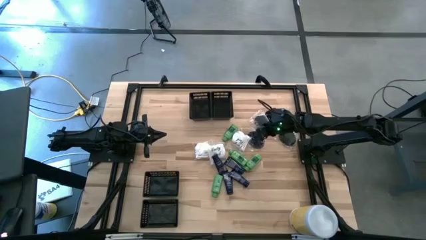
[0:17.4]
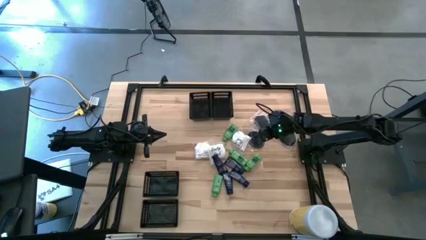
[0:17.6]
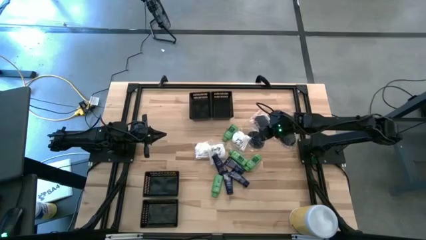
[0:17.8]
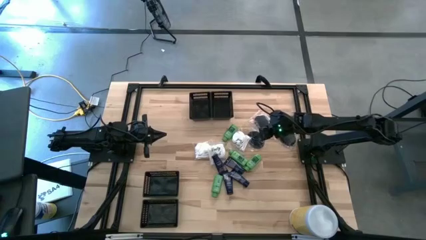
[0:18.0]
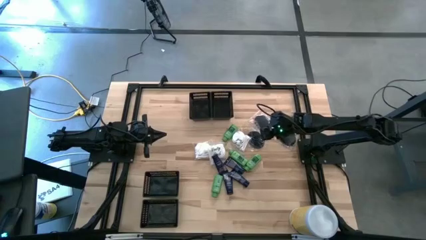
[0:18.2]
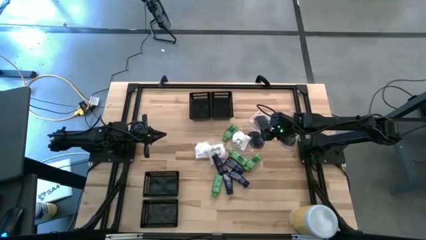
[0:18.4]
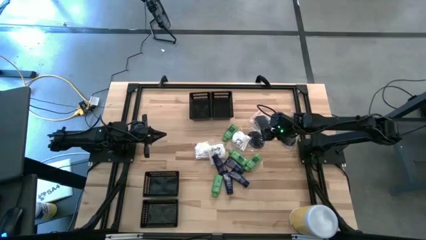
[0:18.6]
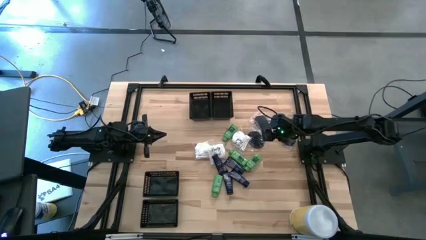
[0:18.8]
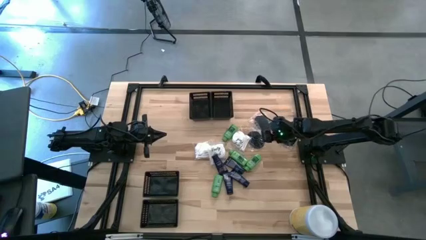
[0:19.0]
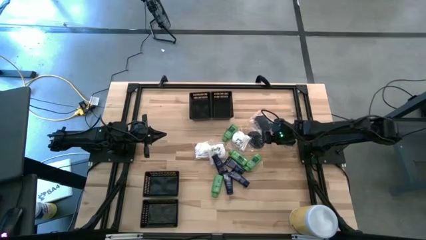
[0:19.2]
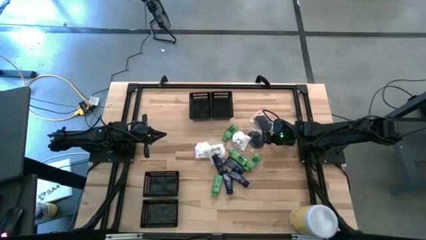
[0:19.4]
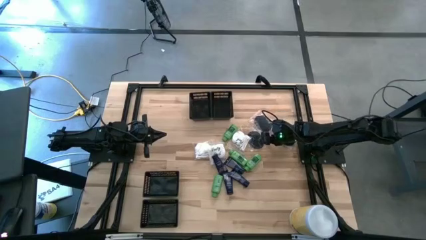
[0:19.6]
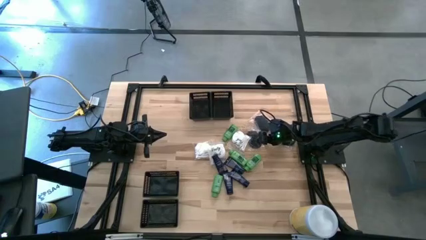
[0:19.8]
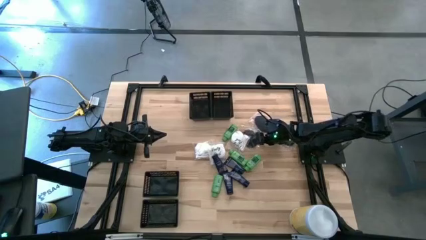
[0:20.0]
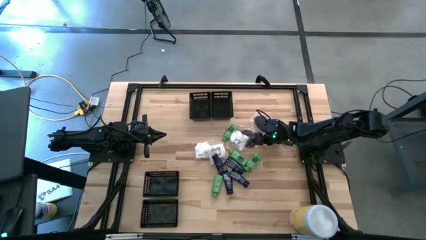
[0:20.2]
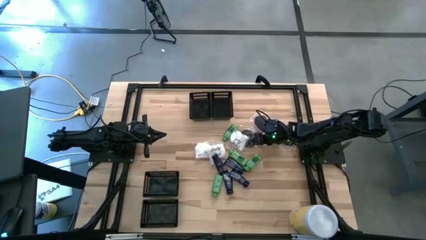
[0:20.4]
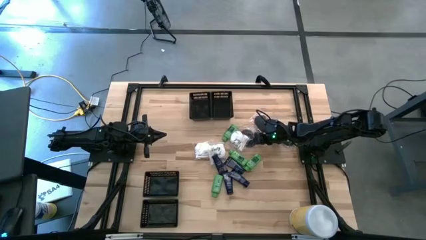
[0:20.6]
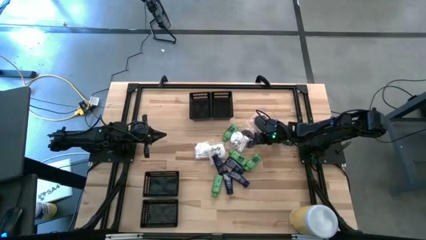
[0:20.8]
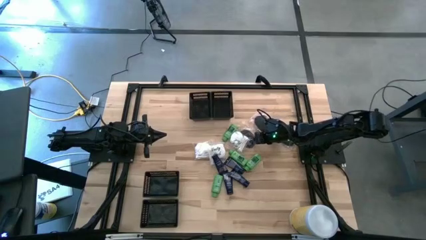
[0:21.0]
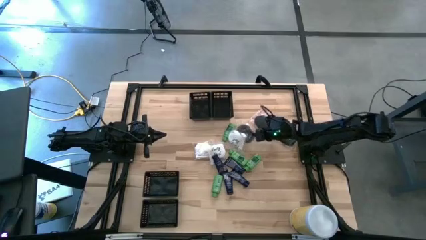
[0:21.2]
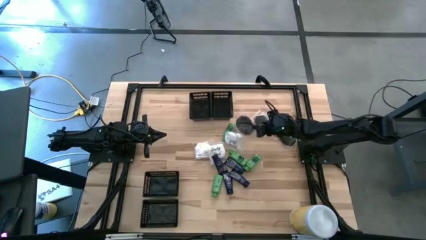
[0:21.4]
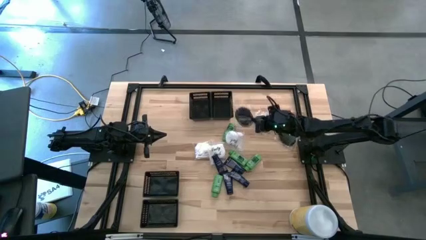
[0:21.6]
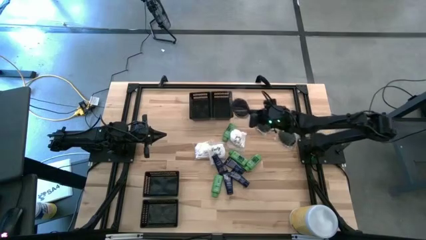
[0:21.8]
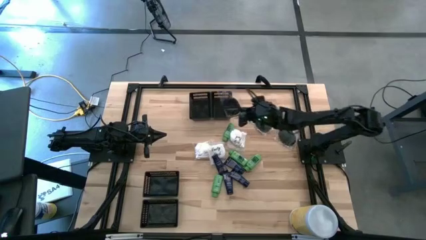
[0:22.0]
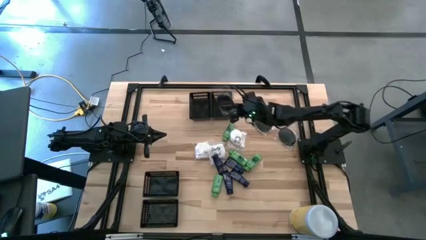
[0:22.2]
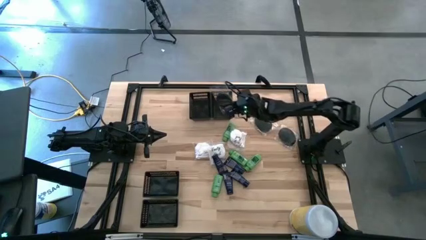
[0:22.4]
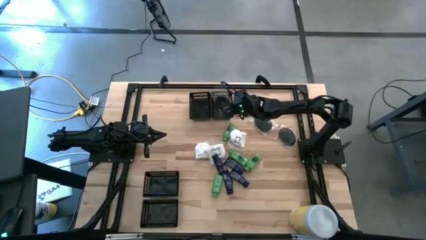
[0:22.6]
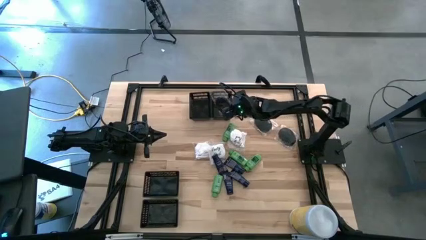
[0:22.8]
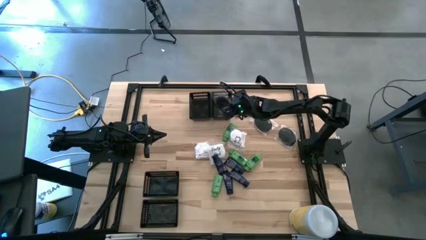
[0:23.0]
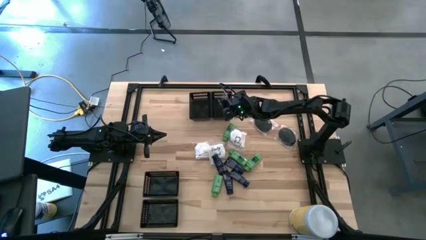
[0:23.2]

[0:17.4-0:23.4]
Task: Pick & Place Travel size toiletries
Put the black hairbrush into the top right basket

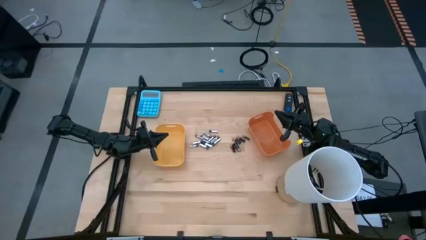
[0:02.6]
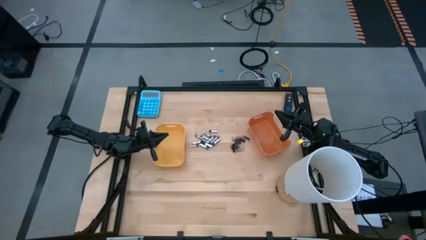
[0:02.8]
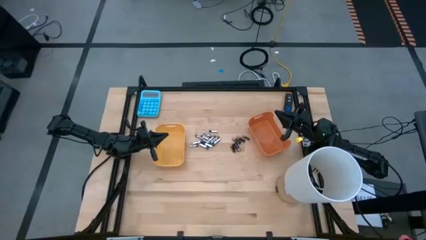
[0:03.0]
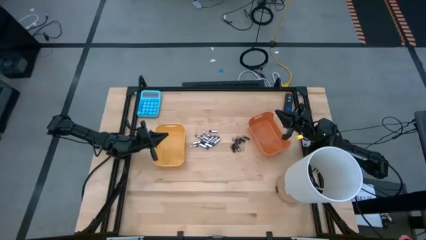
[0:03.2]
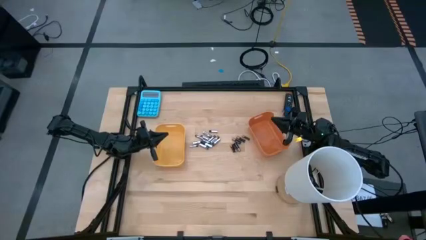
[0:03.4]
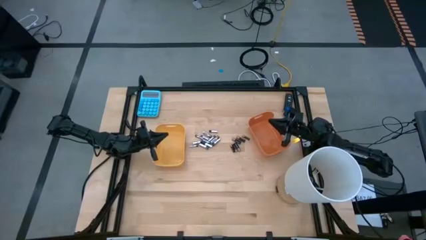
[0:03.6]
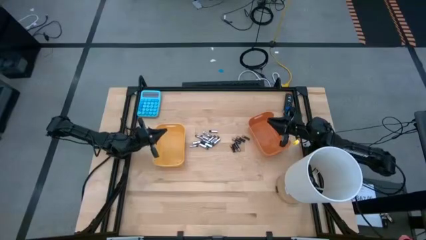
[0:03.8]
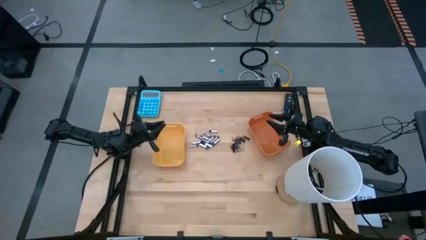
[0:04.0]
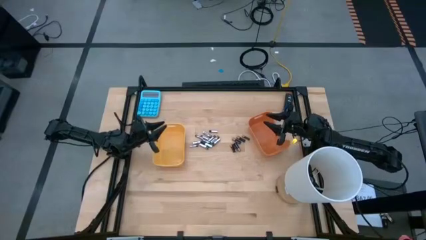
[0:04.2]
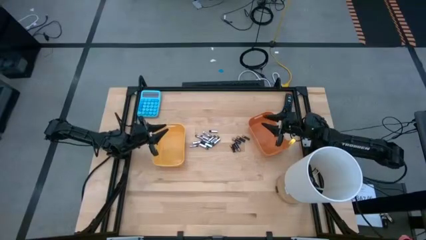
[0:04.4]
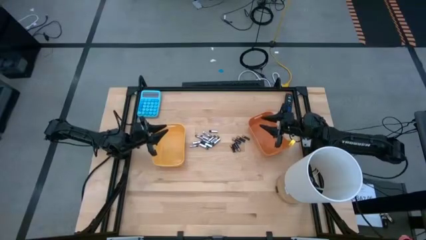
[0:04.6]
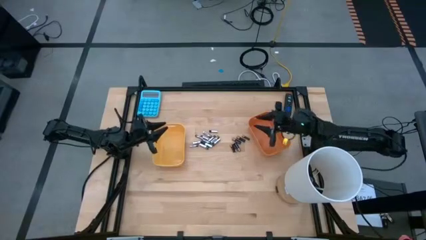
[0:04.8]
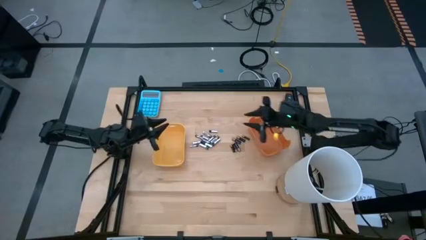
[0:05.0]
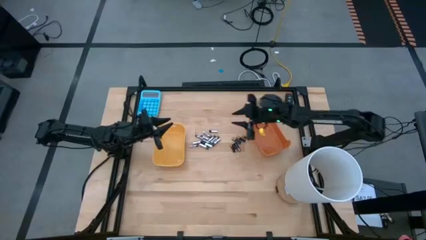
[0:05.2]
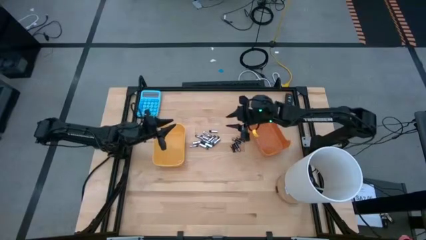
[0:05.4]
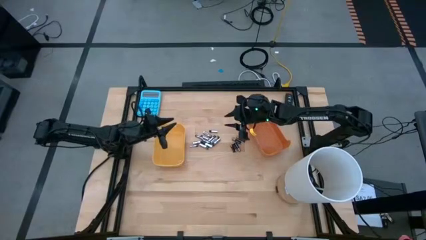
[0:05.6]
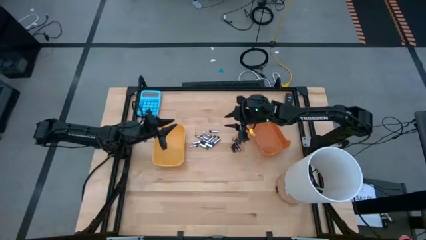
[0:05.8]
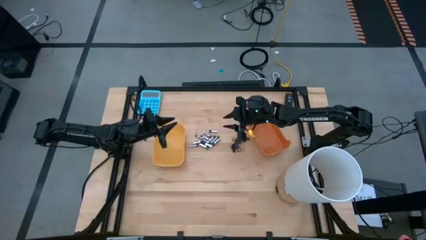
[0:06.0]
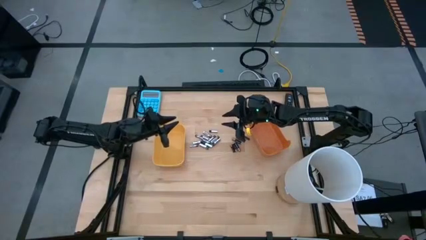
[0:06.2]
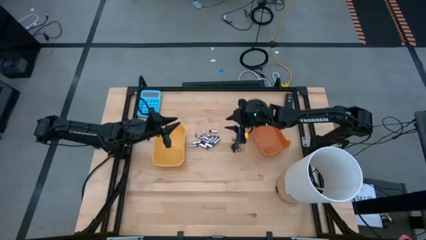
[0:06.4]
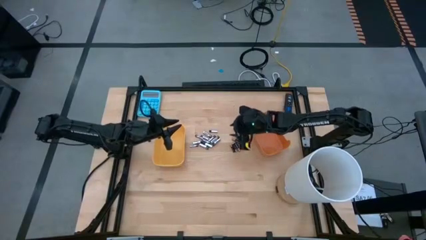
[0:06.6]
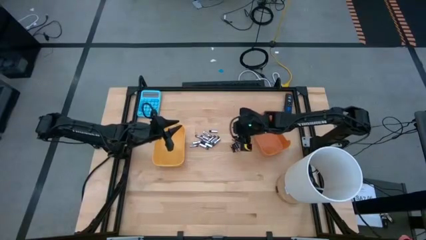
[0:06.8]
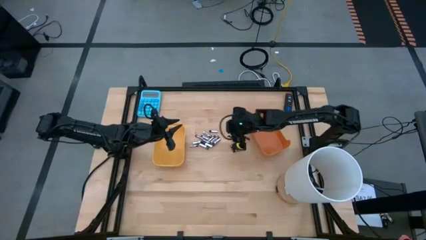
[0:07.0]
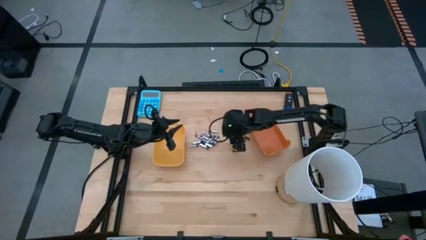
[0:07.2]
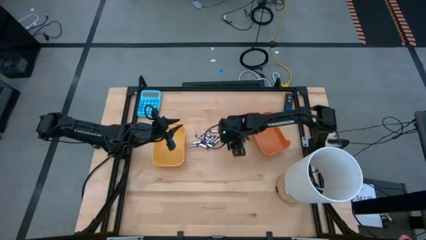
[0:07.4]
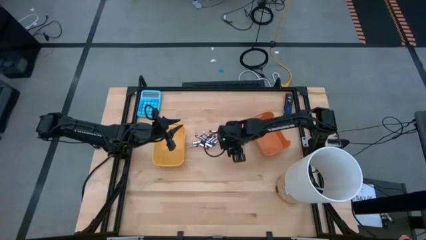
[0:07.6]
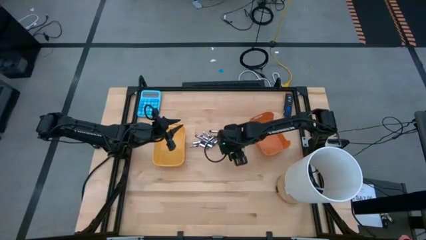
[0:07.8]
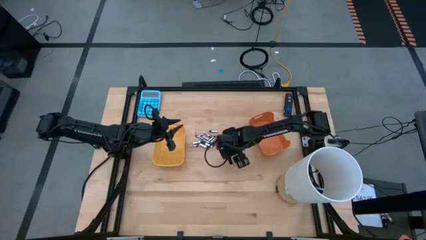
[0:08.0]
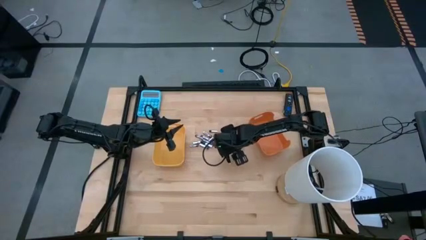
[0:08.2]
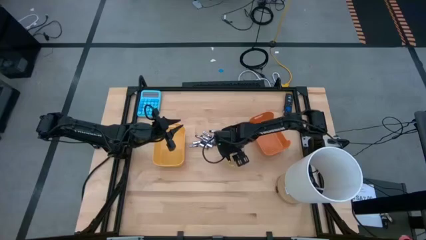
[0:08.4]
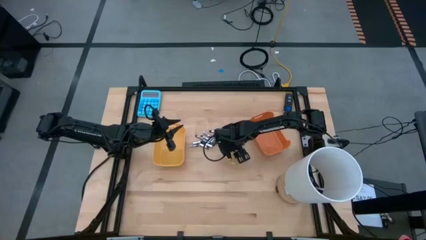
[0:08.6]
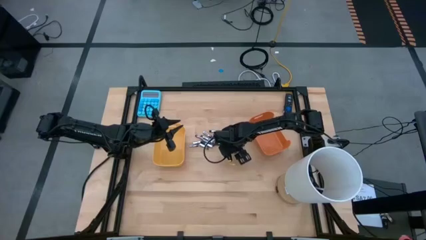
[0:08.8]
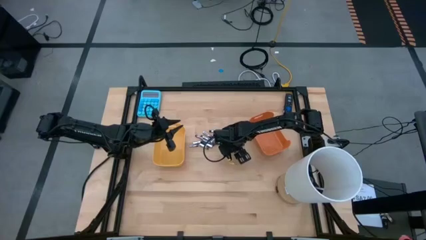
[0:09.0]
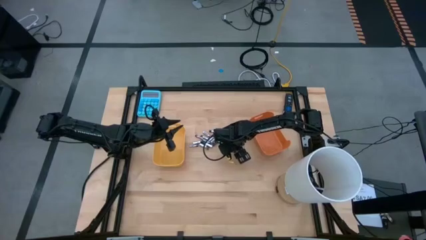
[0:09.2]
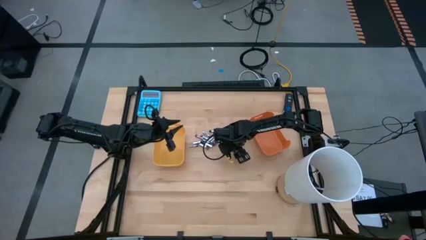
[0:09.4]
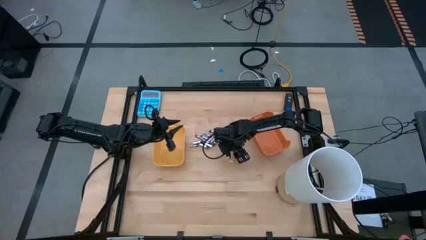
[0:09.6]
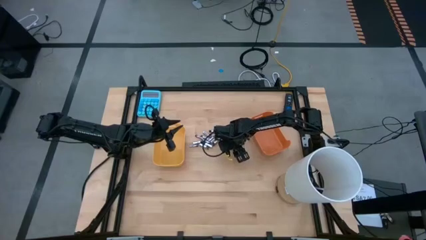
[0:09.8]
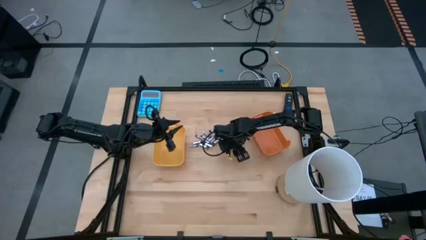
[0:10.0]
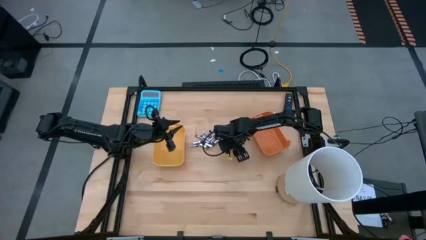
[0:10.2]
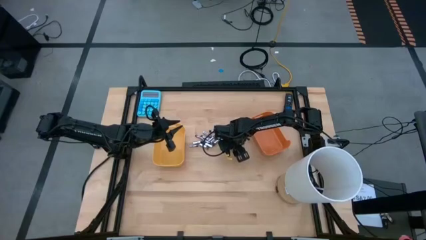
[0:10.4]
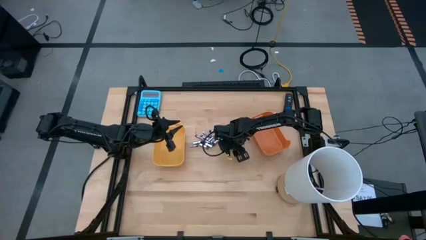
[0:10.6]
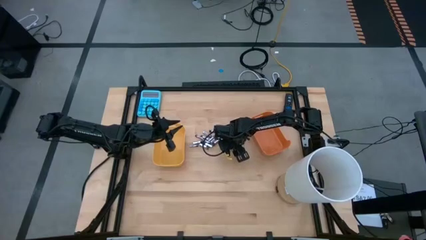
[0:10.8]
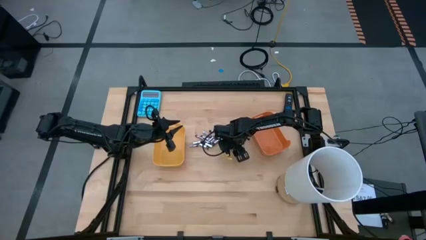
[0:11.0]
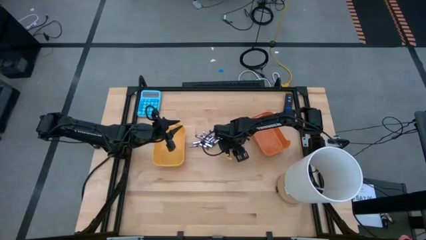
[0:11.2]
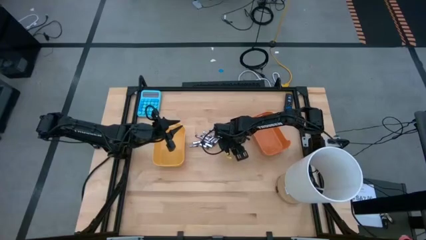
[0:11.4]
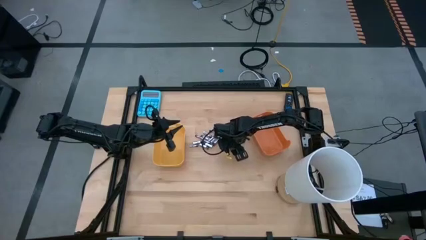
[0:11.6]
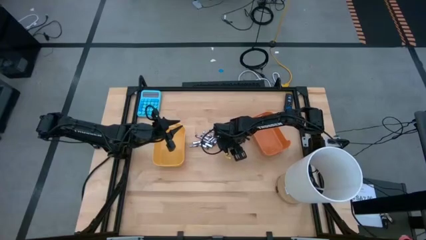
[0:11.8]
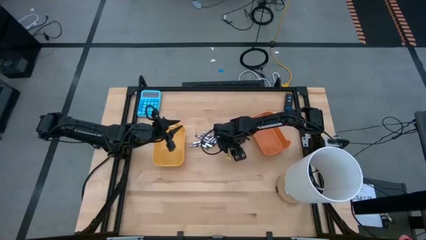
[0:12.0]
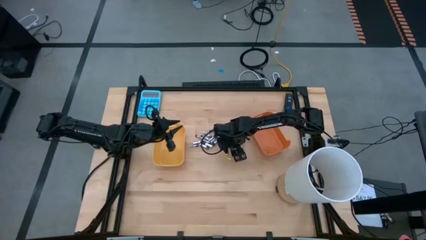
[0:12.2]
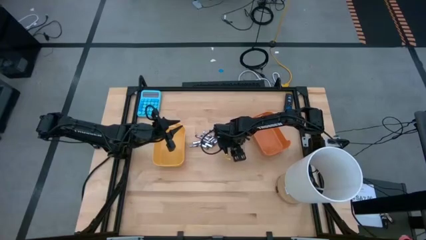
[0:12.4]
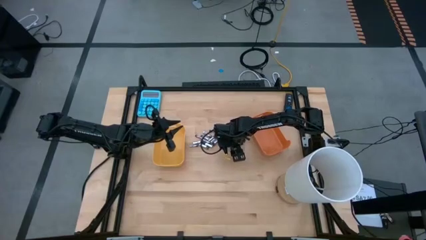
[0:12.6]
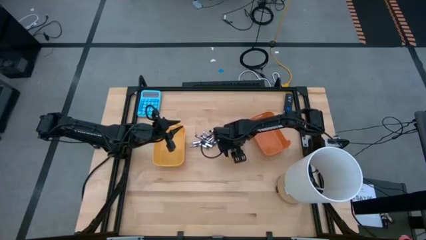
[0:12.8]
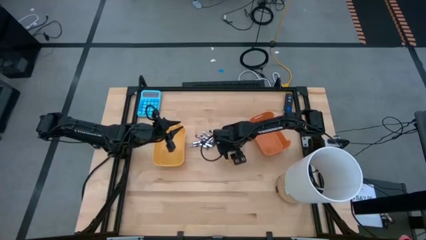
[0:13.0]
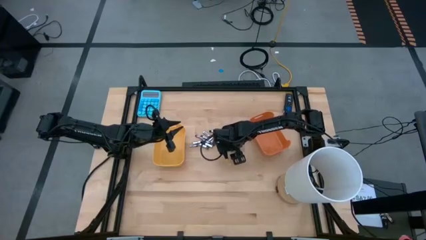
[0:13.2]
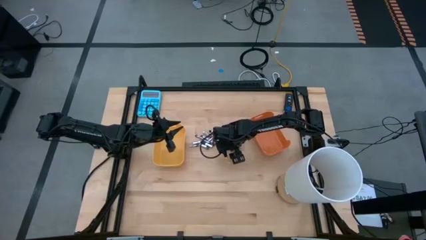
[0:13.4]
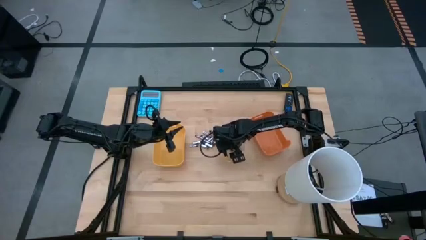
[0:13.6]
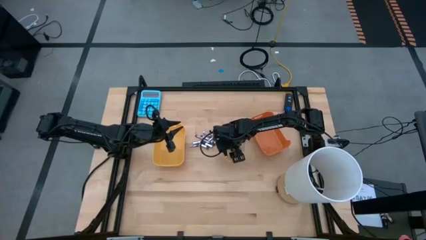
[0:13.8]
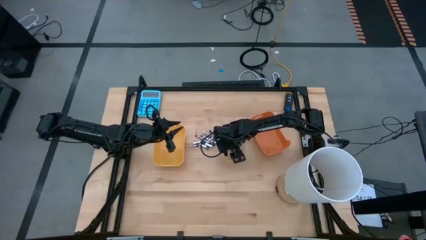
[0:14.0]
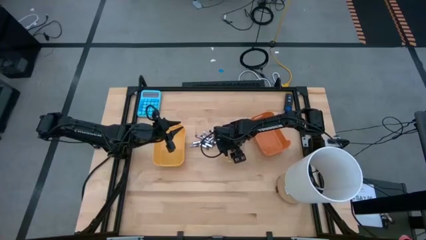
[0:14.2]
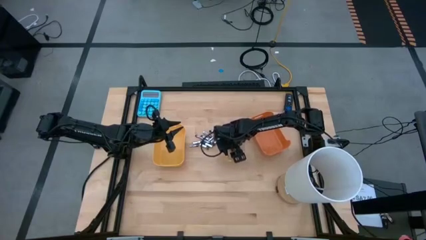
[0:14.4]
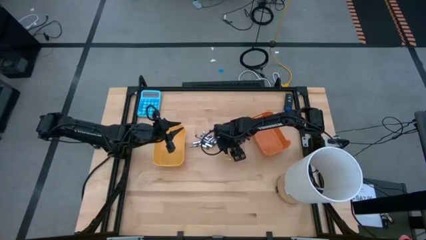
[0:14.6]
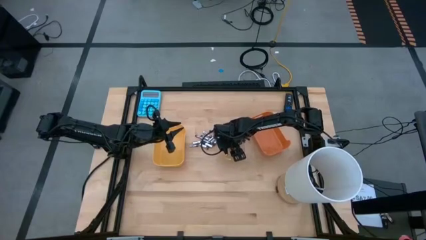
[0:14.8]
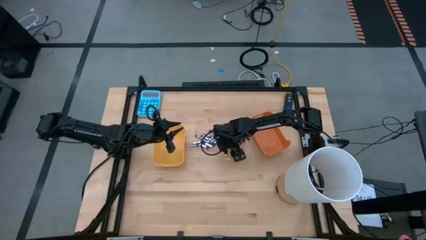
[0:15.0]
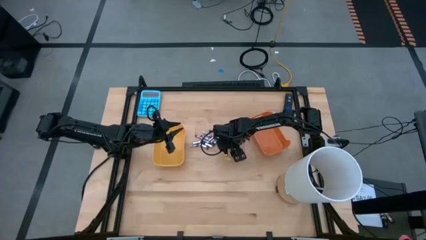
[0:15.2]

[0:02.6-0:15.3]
Task: Sort batteries
Put the black battery into the orange bin
